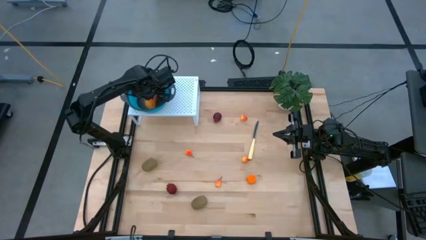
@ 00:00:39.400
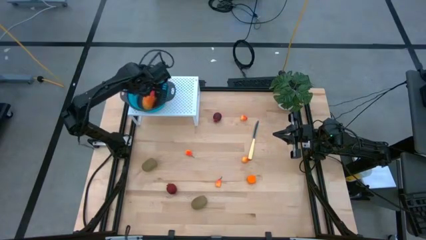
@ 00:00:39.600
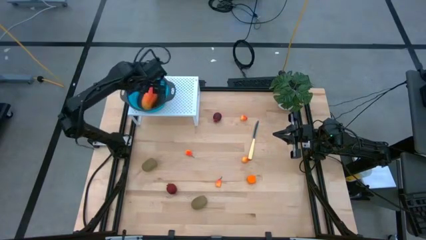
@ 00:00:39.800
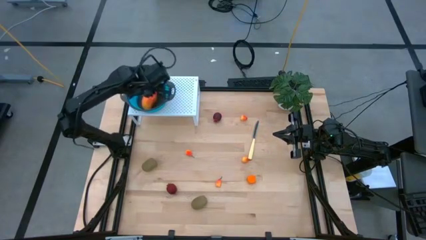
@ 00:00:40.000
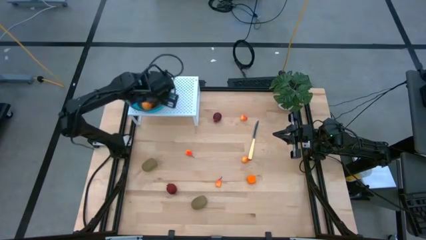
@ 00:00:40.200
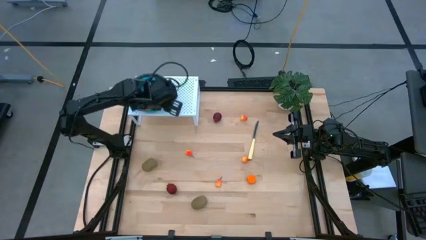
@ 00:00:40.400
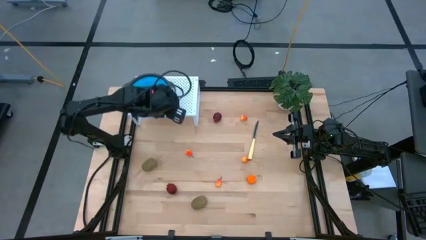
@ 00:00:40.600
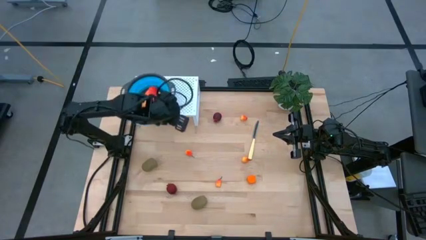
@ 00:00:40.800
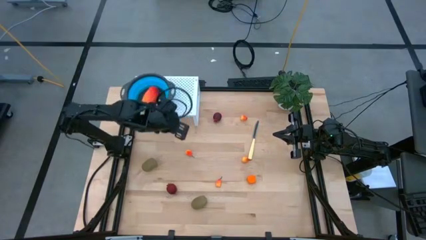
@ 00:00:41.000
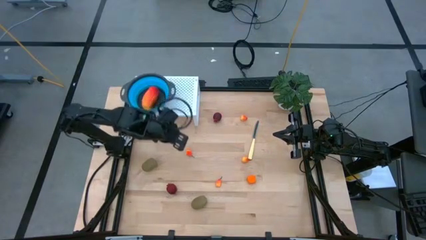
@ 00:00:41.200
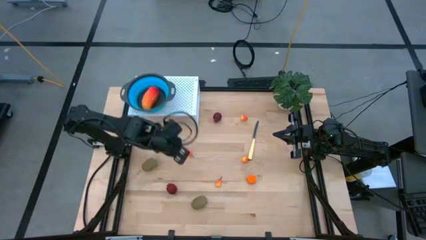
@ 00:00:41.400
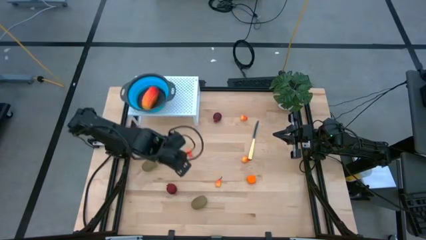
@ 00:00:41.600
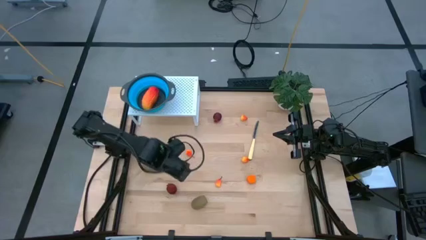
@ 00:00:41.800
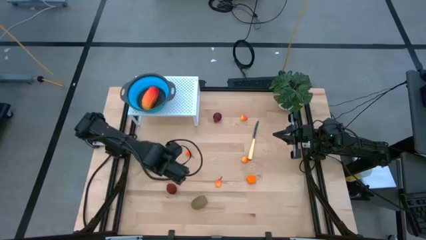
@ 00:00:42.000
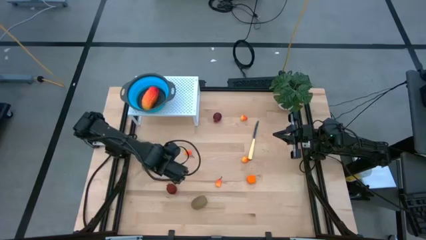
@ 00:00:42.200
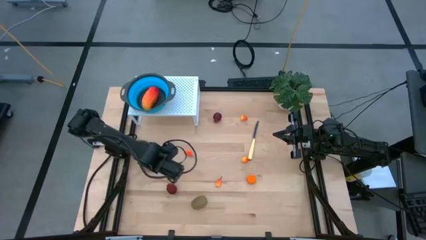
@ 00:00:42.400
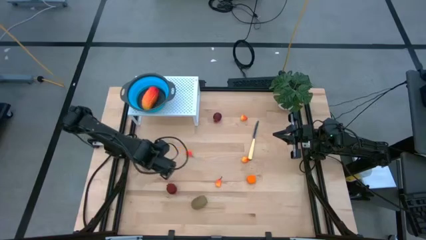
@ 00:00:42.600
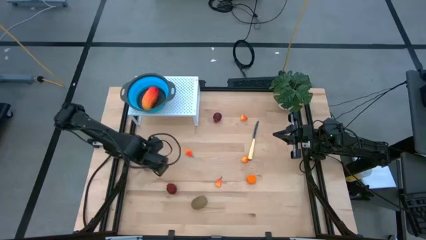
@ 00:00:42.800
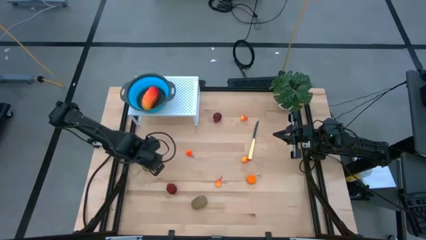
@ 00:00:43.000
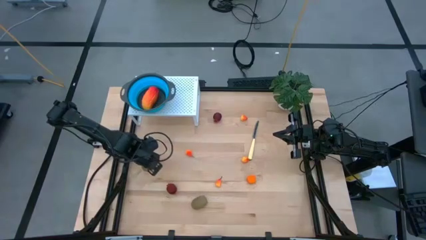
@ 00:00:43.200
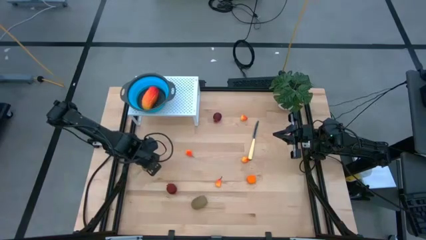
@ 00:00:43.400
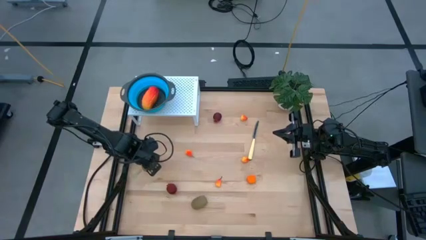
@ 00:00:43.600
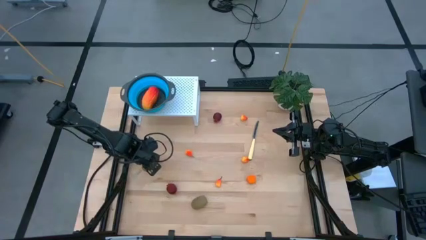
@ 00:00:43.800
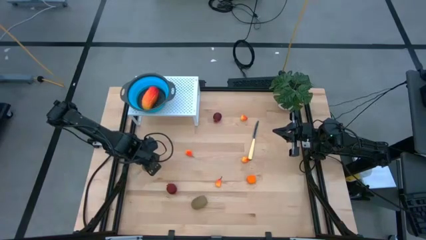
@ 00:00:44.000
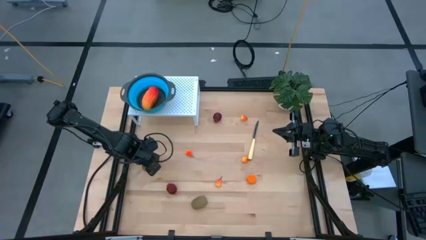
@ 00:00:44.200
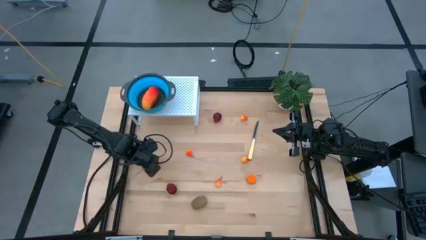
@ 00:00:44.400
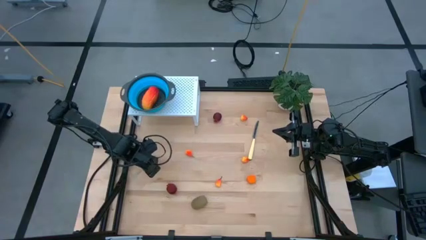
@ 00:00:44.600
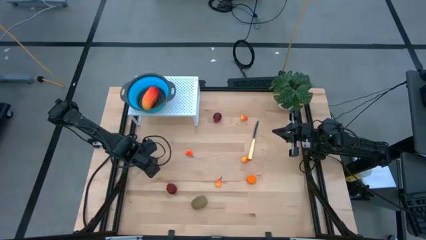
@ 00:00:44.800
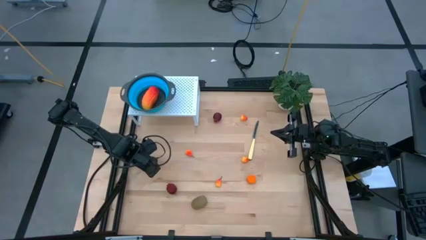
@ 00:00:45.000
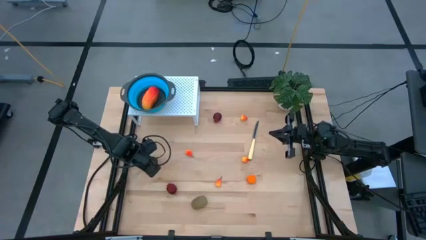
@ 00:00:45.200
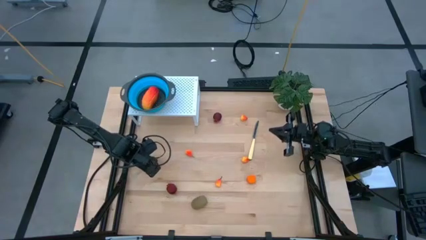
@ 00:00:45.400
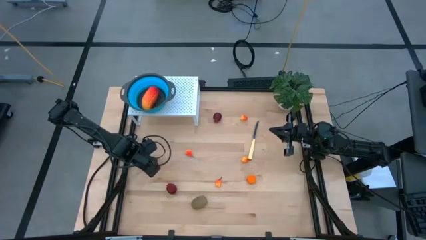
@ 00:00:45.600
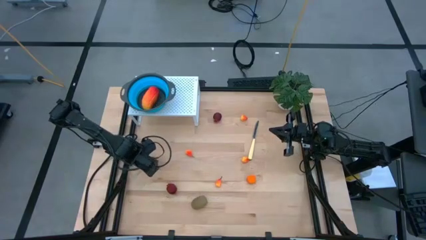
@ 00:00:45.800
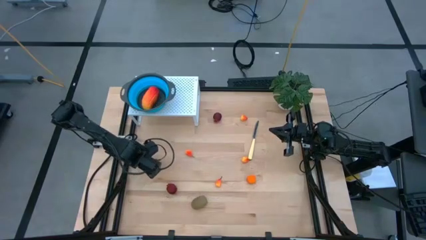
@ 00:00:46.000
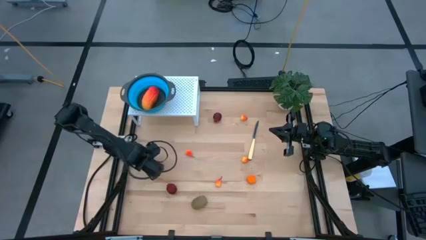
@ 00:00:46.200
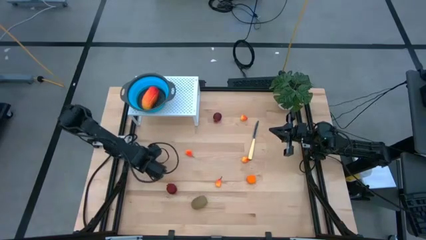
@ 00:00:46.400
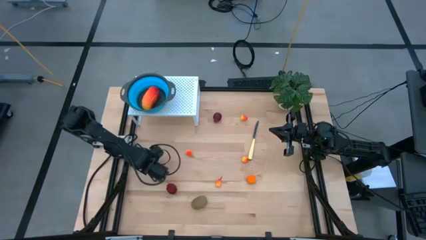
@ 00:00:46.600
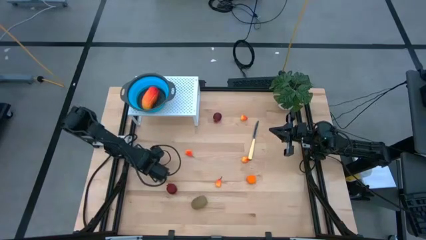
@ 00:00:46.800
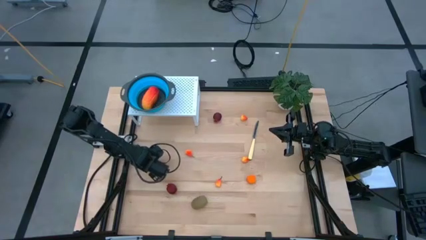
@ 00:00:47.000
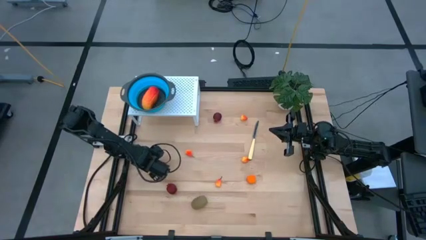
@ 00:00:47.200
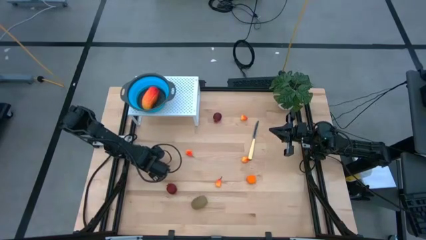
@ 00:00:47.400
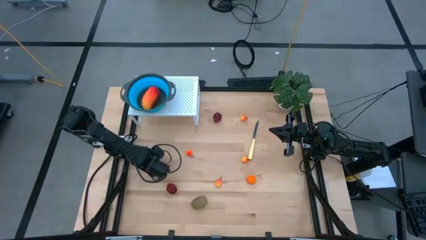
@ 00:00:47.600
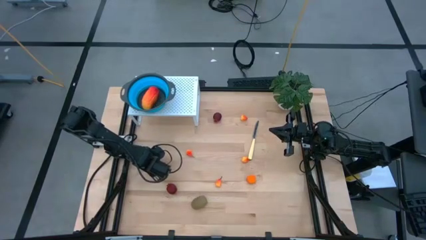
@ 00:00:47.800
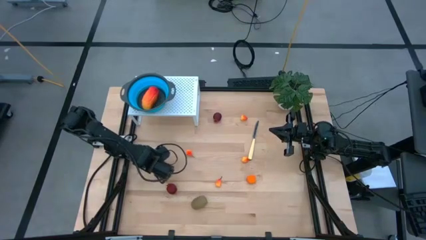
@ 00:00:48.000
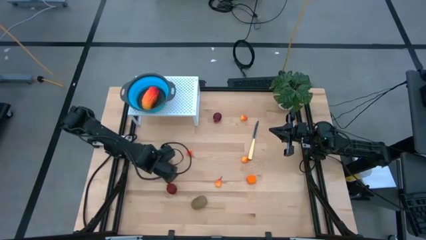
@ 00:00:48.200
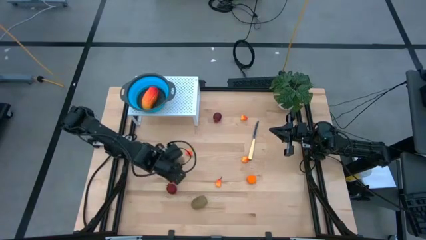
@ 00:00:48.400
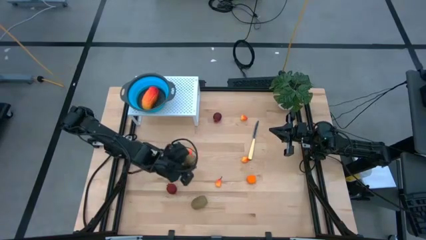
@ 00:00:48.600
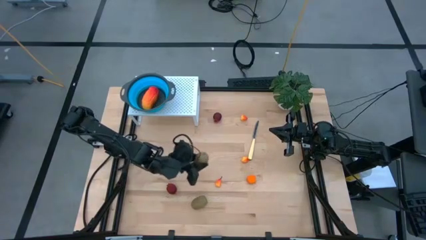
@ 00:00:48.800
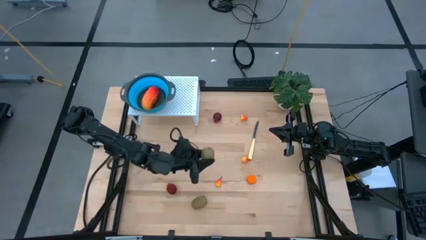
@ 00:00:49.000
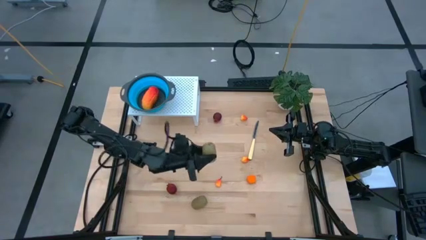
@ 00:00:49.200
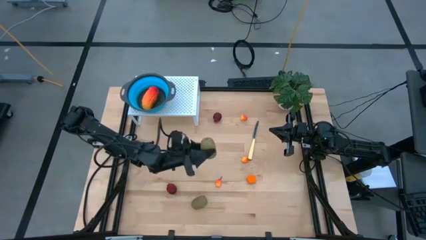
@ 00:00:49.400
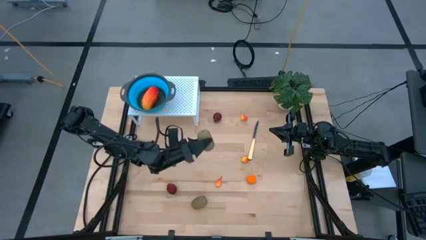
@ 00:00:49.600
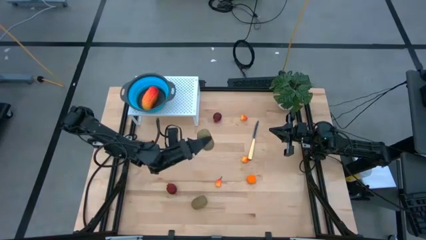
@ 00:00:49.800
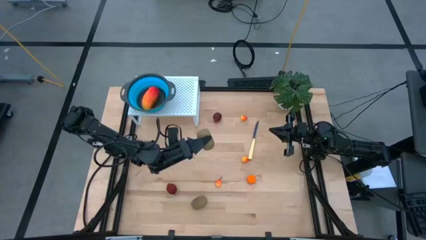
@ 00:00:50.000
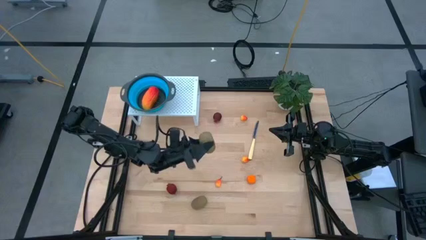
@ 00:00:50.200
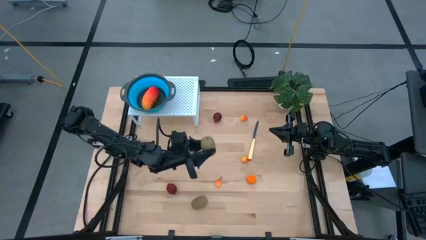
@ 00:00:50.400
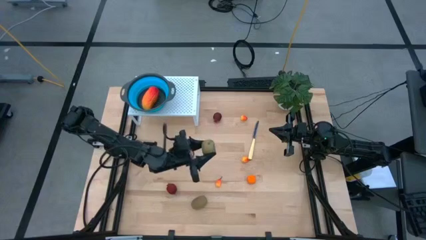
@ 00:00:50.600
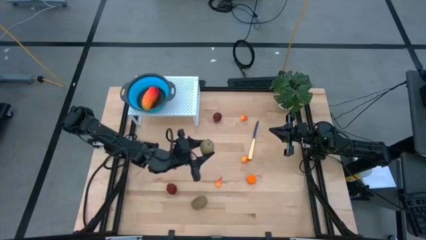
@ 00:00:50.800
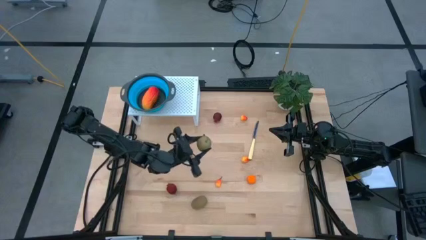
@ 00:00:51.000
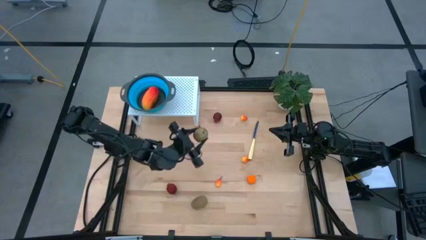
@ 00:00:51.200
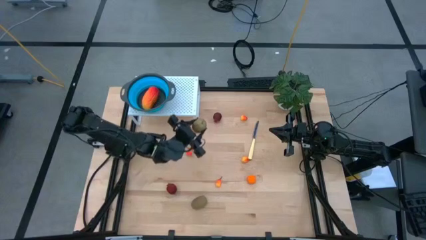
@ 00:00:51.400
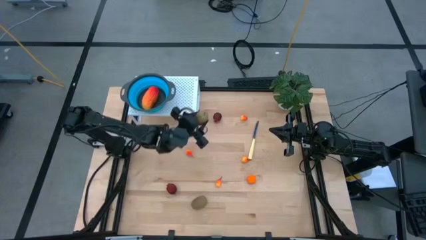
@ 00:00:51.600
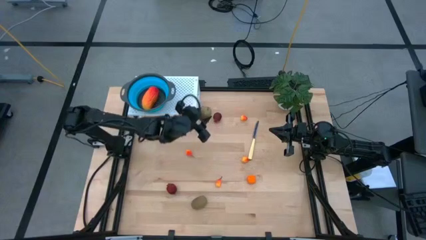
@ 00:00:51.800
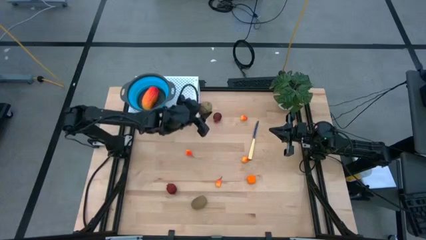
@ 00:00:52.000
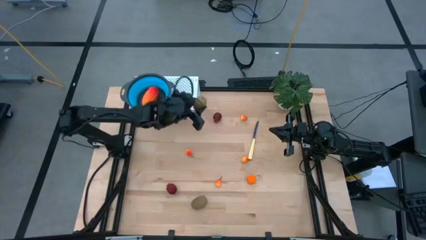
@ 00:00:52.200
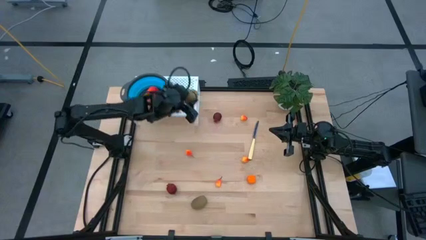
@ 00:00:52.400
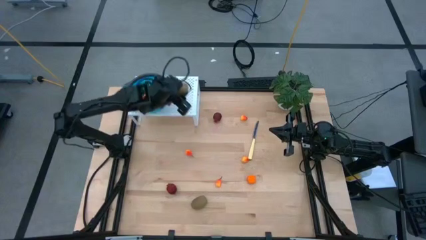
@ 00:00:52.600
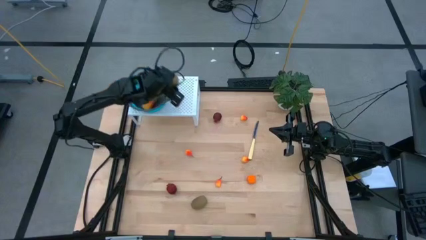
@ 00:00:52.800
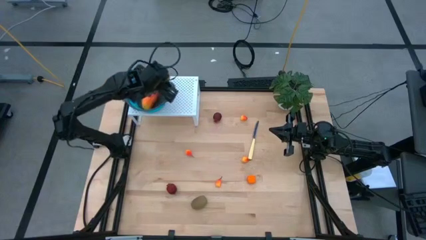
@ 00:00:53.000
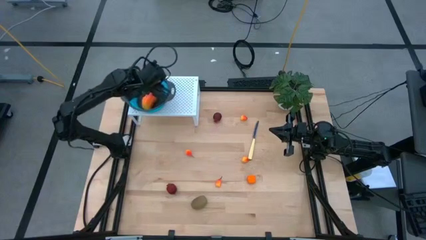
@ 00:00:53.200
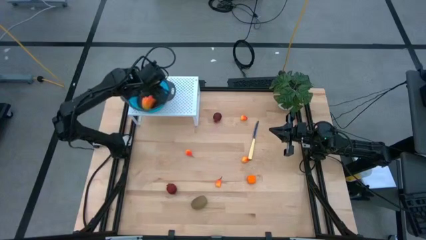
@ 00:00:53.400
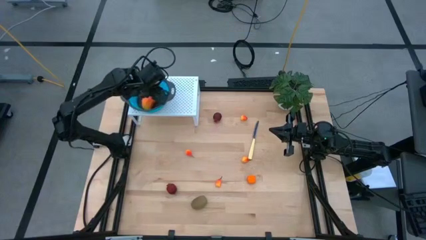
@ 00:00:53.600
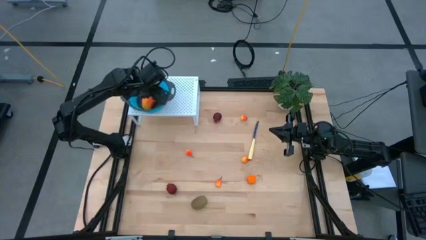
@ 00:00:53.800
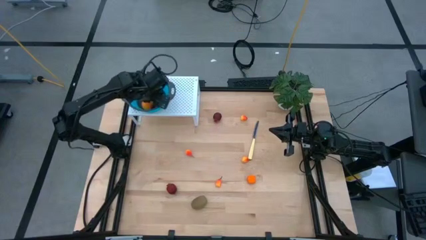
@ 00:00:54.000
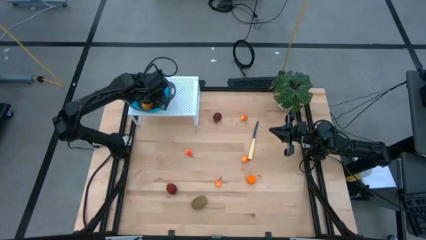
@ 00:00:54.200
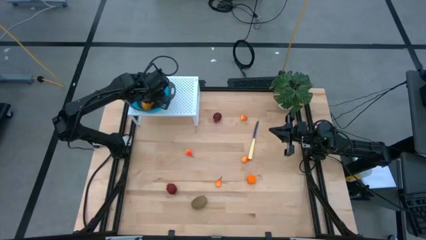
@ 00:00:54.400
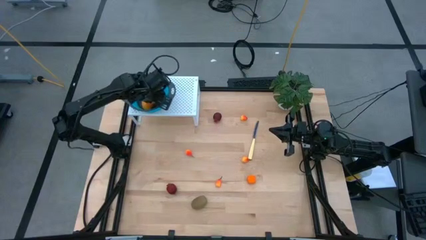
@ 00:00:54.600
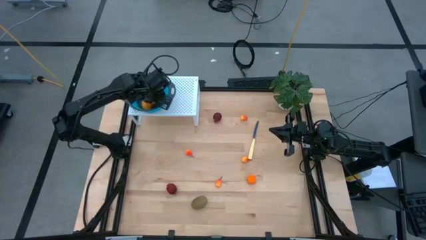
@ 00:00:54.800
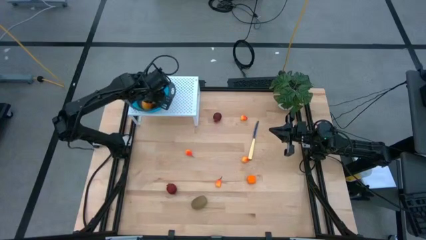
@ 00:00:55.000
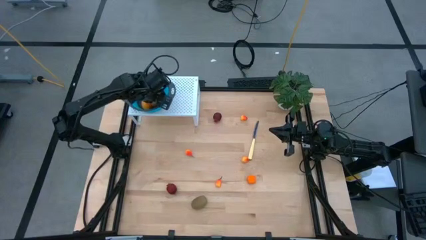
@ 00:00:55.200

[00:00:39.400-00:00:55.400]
Task: Pick & Place Fruit
Put the brown kiwi into the blue strainer bowl on the shelf
